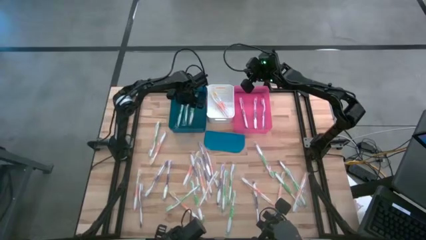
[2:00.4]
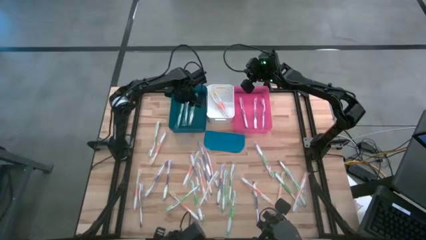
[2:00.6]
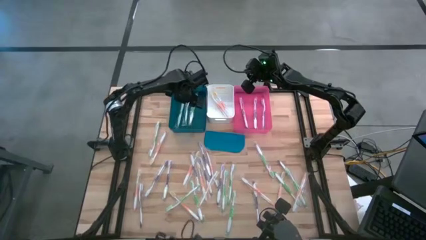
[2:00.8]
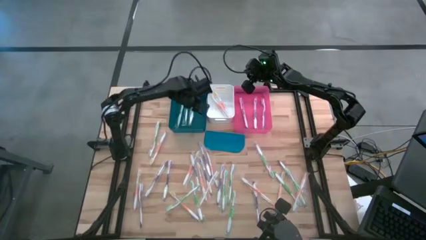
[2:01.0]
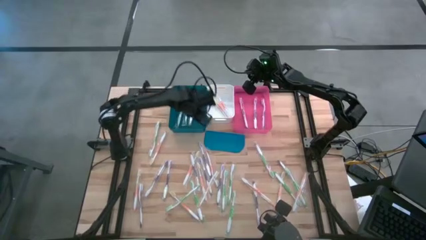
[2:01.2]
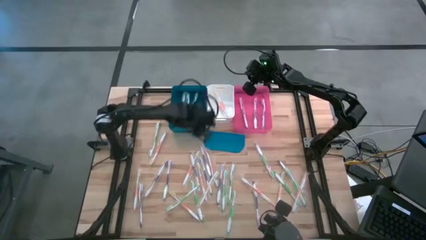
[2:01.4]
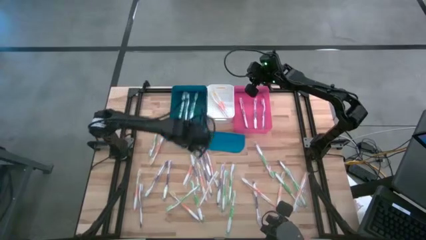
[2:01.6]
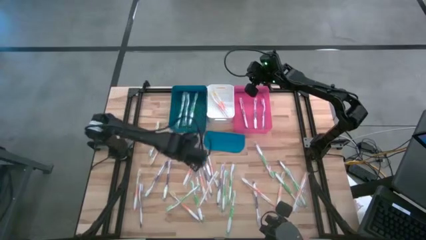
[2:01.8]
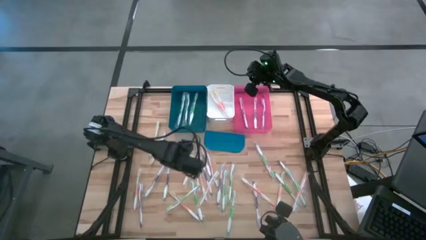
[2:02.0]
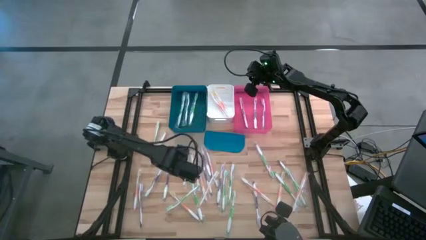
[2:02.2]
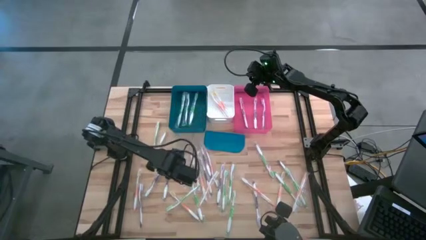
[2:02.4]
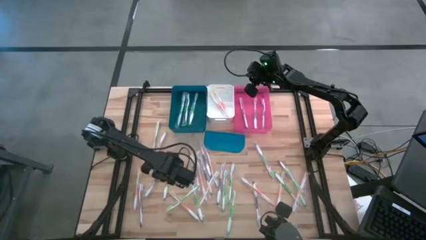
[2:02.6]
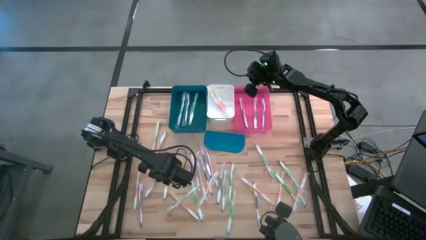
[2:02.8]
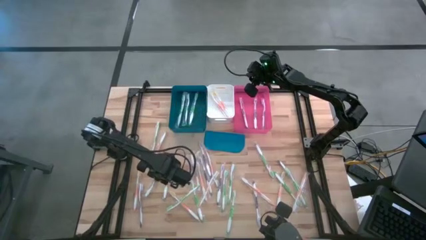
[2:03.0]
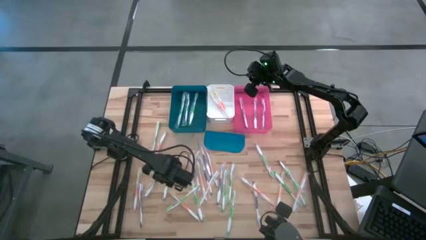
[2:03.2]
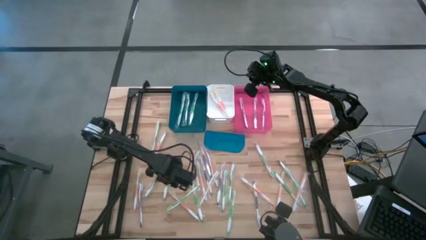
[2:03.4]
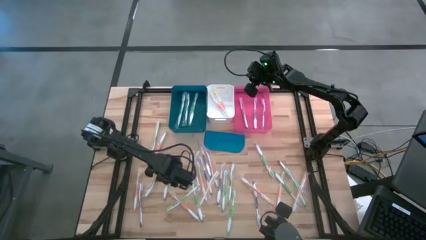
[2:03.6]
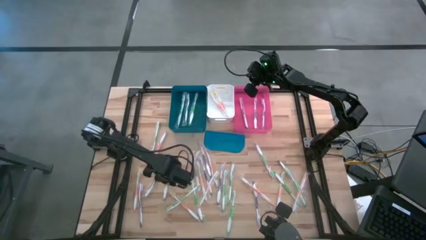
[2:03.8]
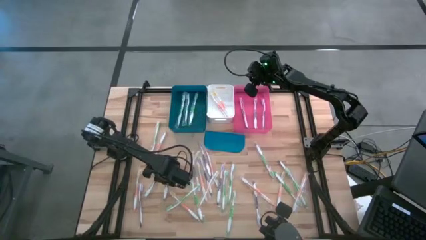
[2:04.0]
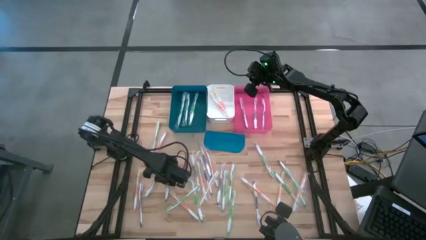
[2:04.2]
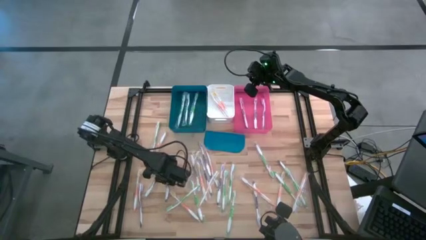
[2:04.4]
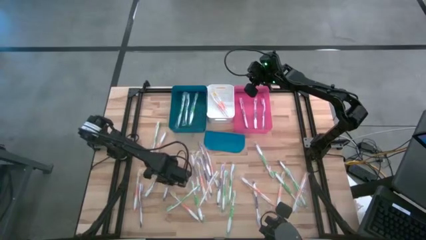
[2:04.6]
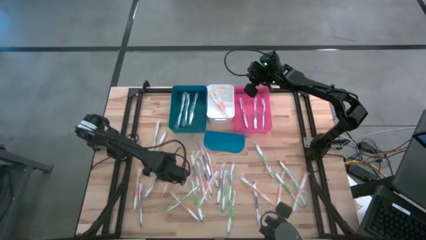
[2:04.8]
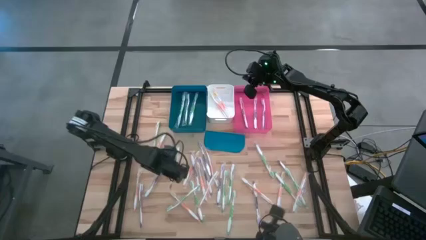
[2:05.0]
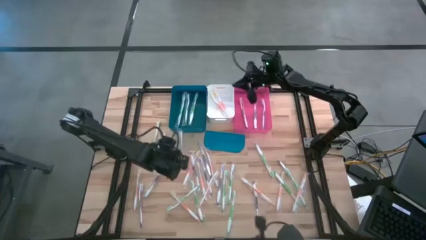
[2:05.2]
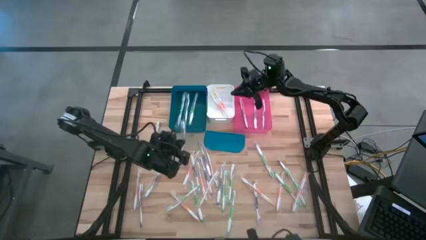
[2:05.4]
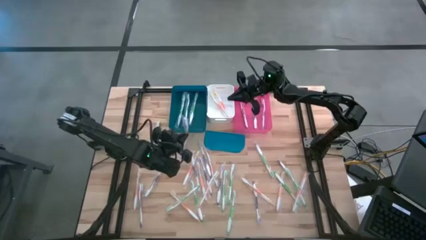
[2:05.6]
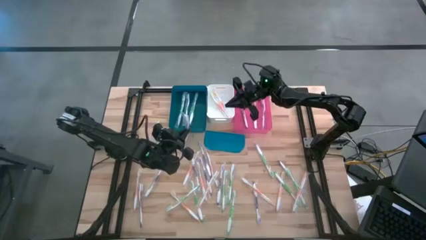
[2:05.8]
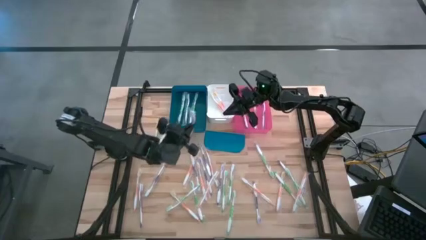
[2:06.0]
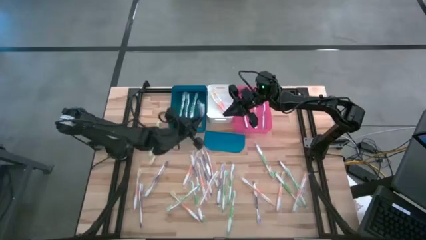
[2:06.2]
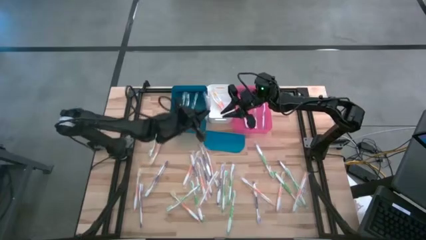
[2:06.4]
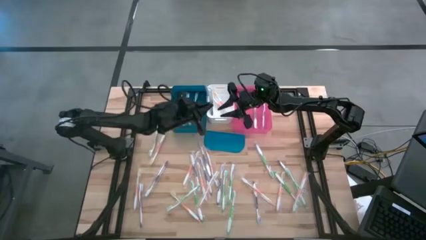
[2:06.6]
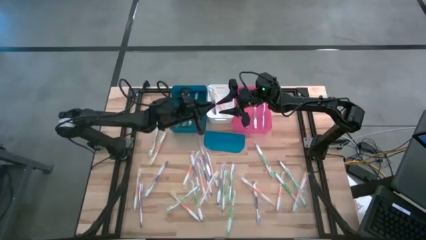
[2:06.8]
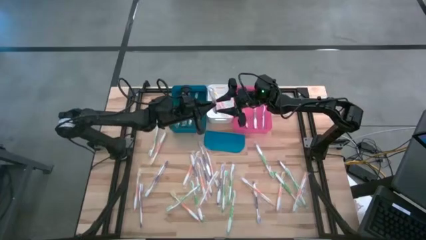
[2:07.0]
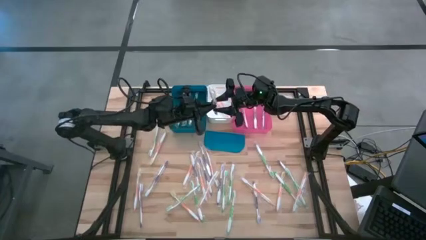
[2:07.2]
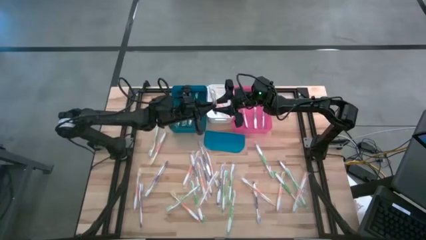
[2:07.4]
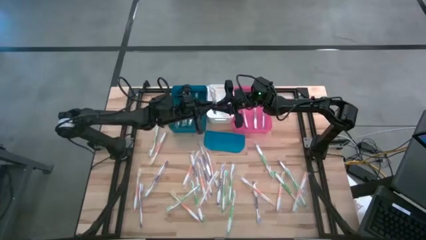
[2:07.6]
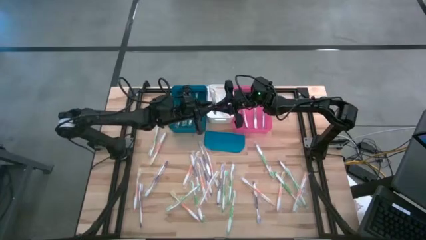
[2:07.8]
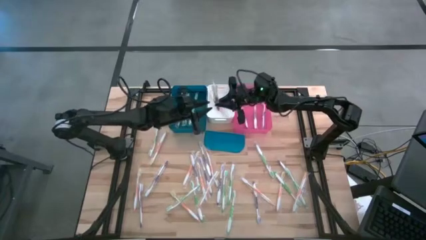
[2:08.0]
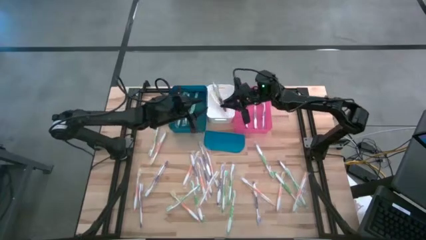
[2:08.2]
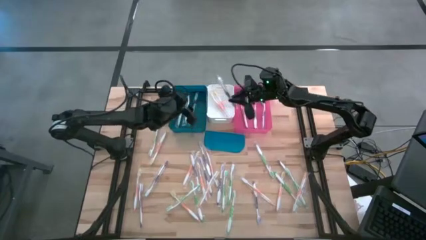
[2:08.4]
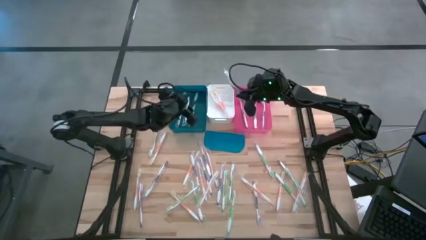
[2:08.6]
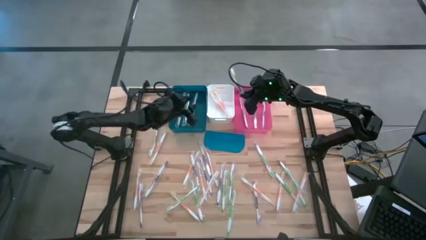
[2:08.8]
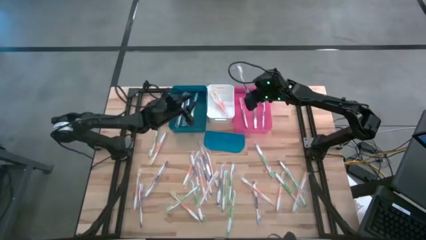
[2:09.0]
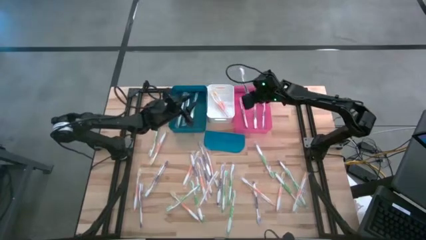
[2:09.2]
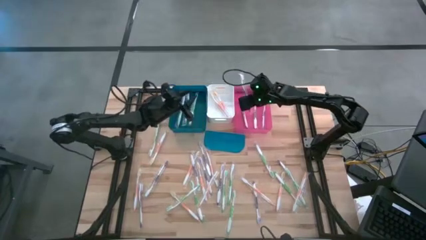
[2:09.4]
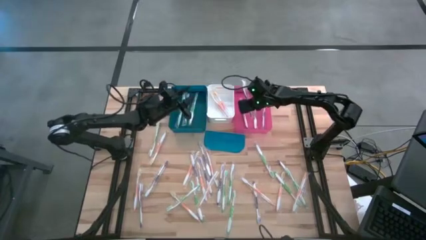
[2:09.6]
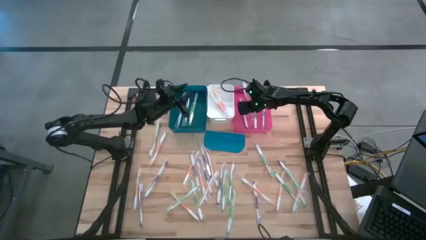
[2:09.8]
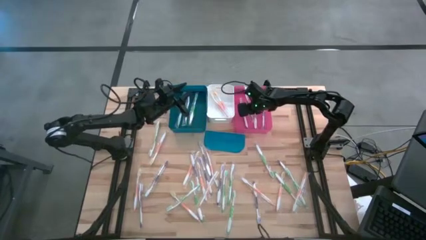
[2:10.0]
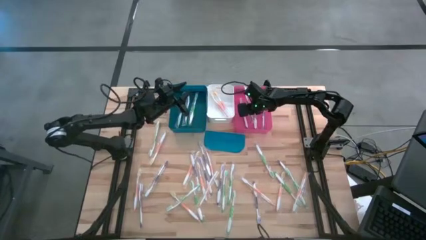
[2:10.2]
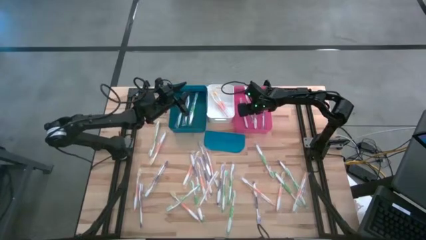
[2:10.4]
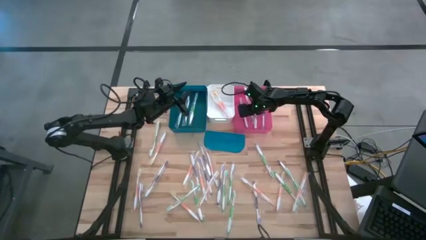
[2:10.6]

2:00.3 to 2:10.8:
Task: Pick & Place Toothbrushes
Put the purple toothbrush into the pink bin

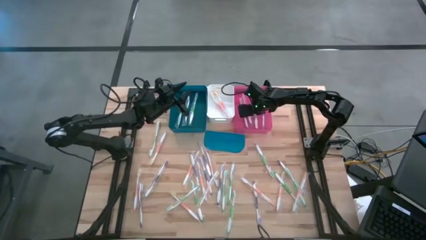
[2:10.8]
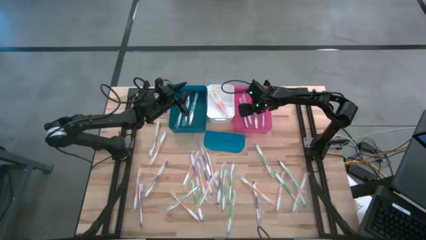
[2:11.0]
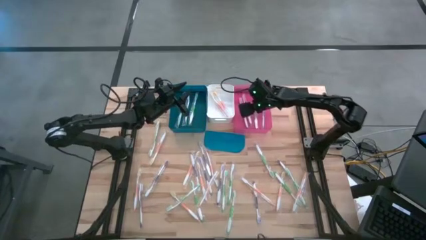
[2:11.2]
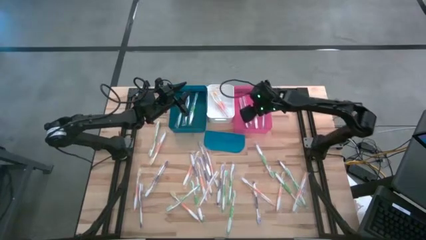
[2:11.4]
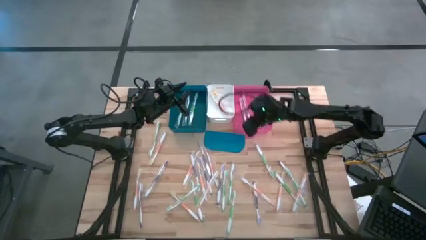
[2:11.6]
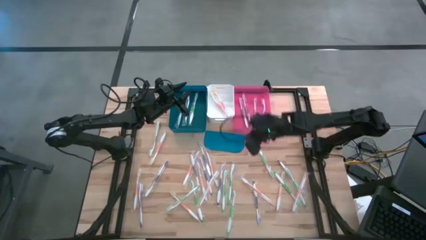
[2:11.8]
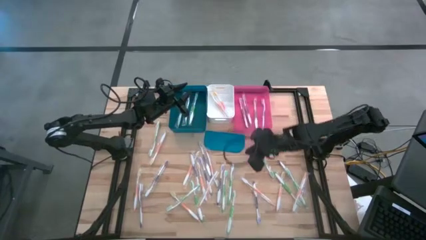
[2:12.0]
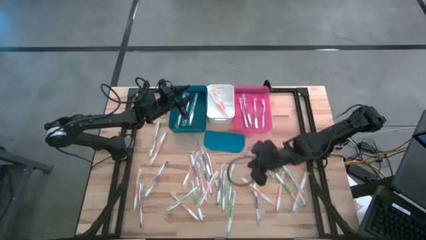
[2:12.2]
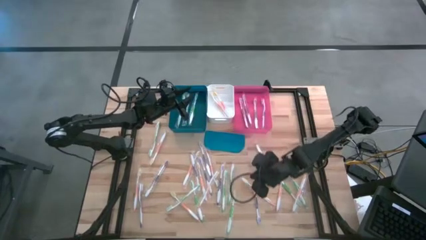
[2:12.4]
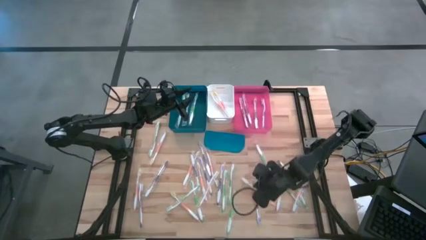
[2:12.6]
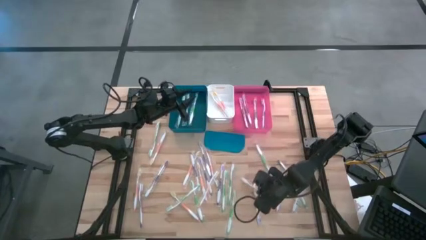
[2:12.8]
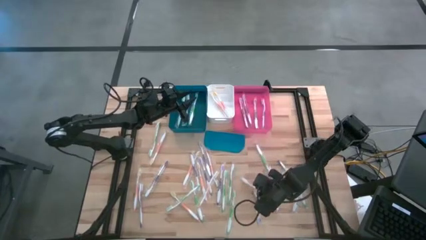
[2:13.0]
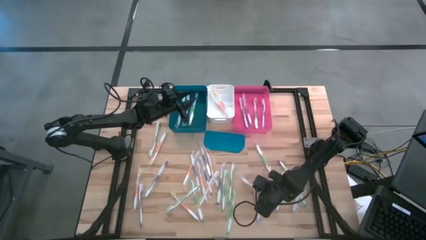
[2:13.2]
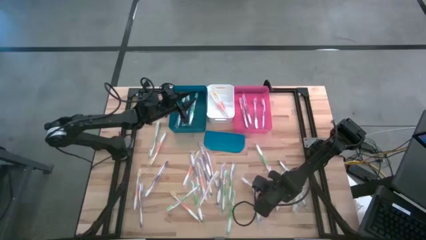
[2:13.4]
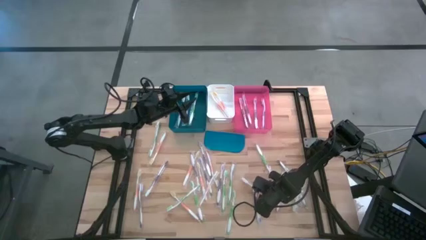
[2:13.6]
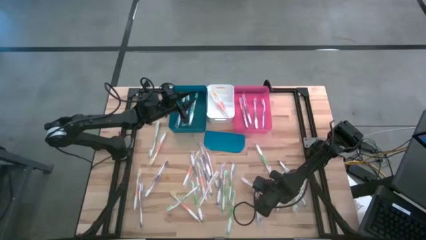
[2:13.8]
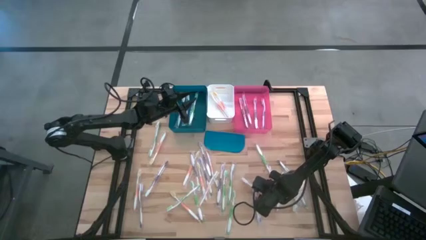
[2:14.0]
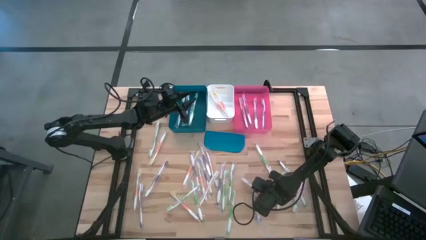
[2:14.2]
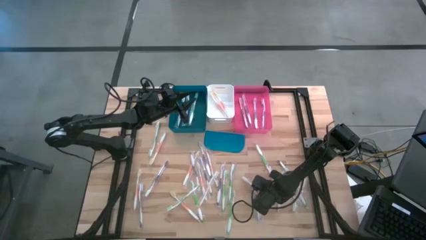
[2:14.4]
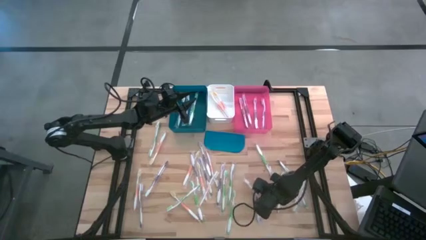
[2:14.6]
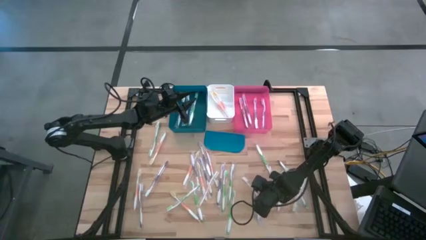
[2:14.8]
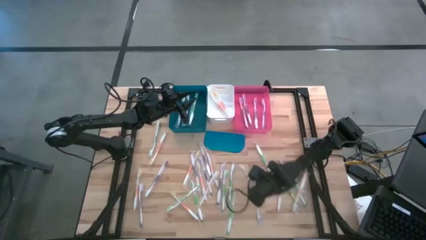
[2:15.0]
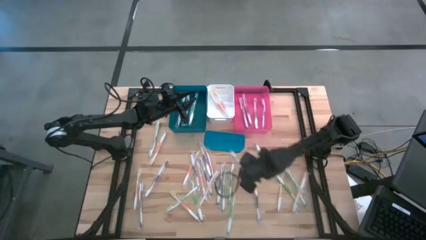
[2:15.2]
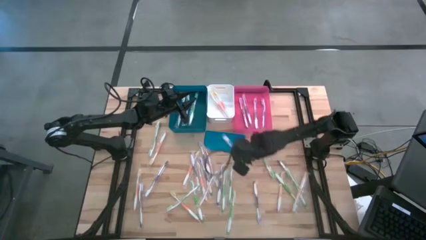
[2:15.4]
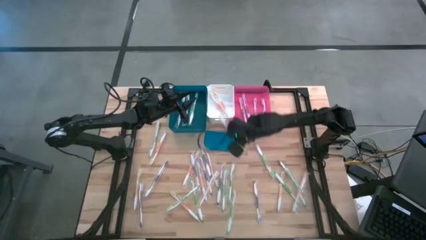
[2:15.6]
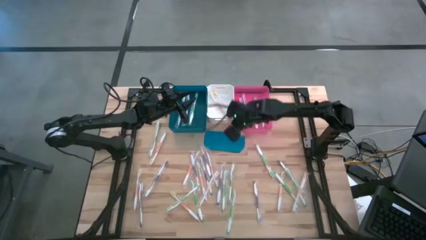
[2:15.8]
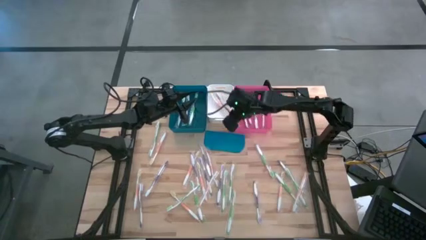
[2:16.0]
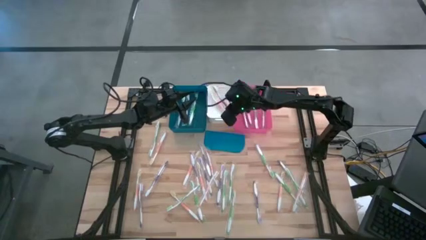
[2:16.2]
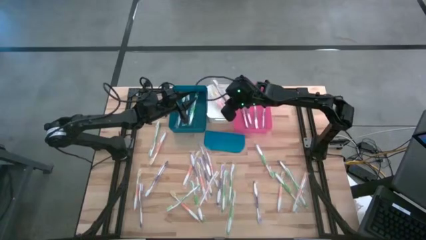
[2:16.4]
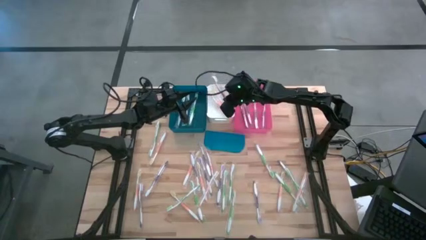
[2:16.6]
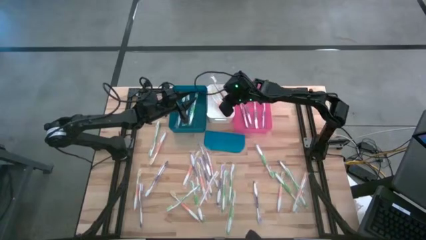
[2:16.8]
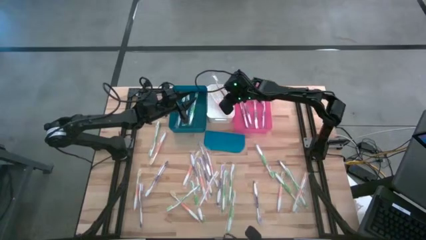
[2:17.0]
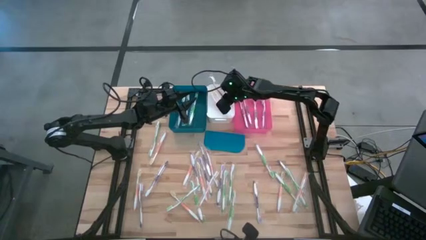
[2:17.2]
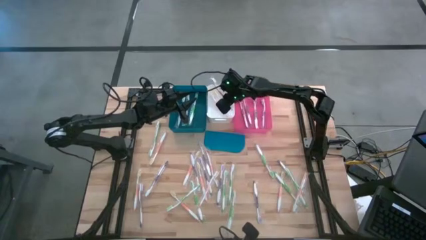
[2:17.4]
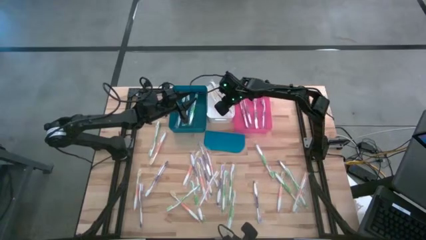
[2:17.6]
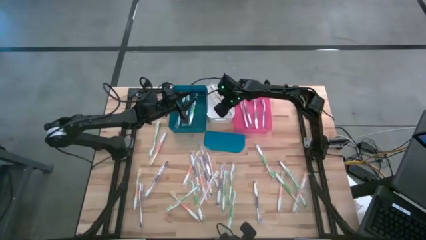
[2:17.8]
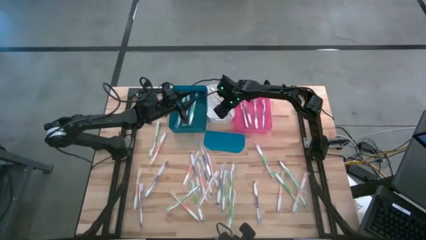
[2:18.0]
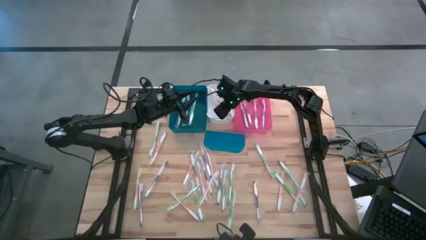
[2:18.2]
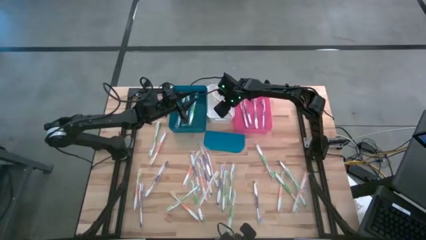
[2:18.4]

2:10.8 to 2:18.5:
Put the orange toothbrush into the white bin
